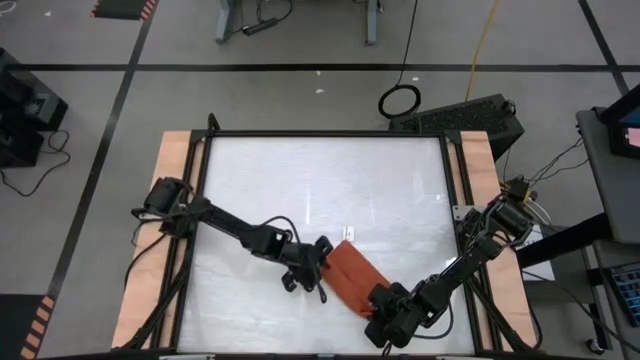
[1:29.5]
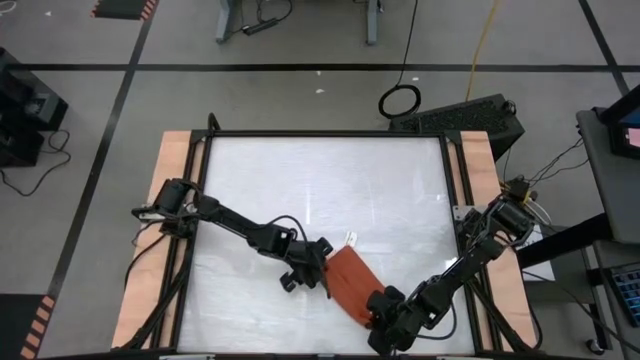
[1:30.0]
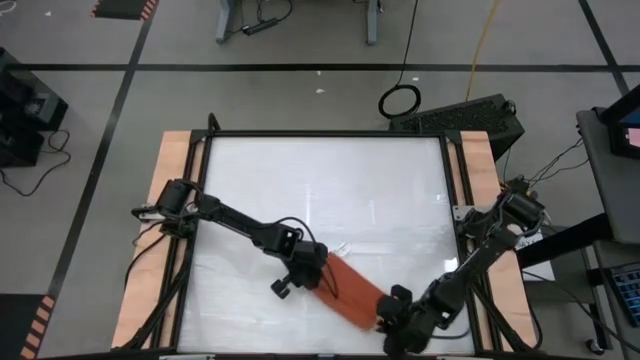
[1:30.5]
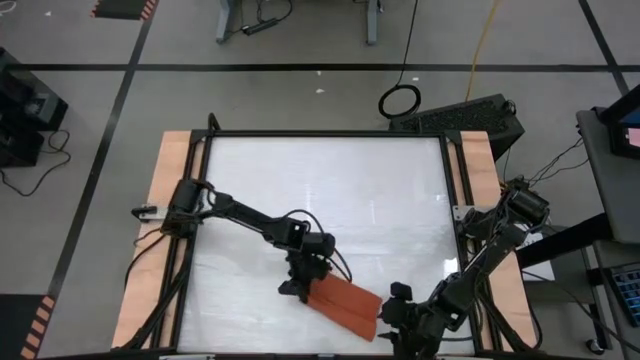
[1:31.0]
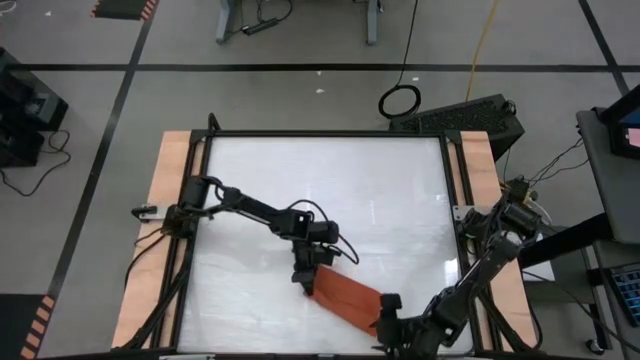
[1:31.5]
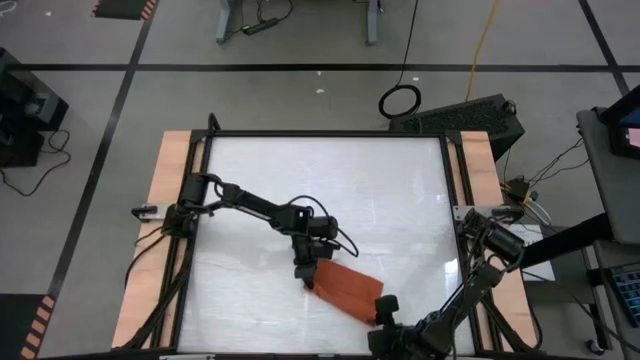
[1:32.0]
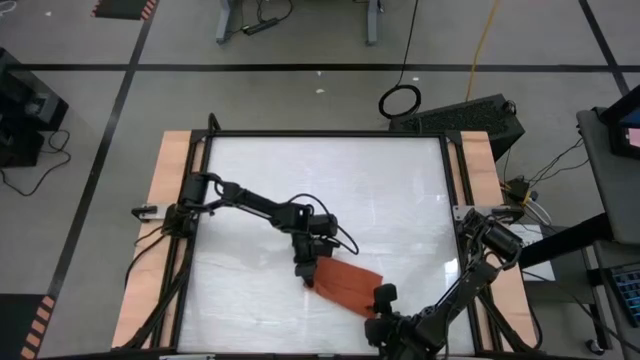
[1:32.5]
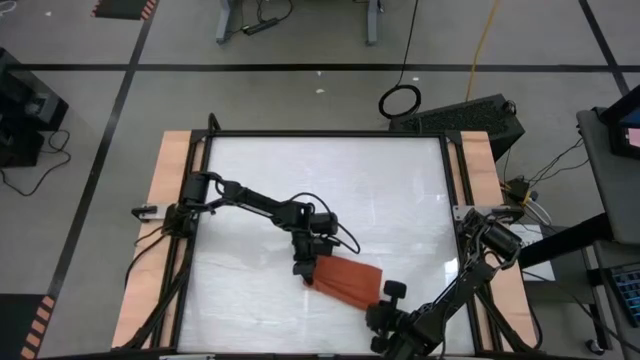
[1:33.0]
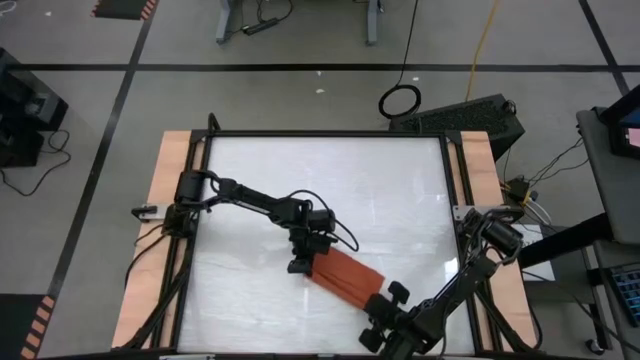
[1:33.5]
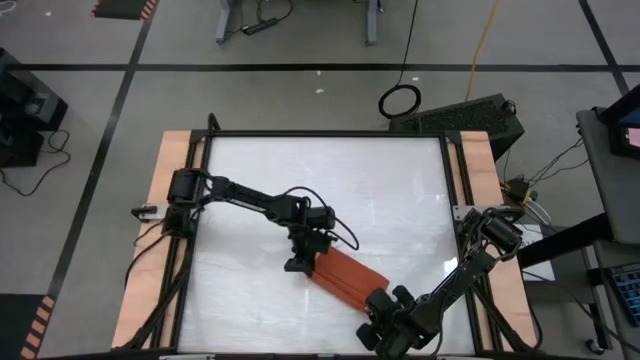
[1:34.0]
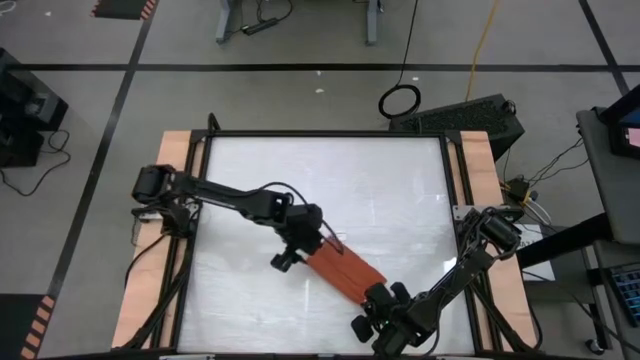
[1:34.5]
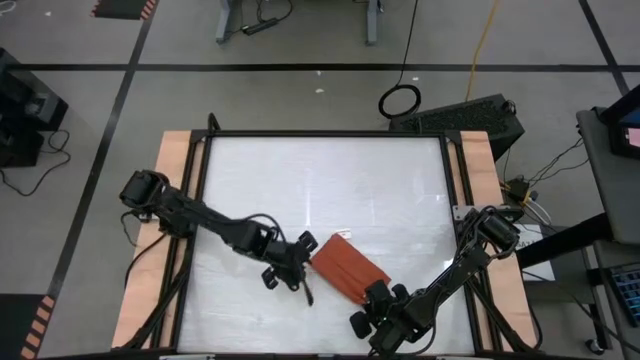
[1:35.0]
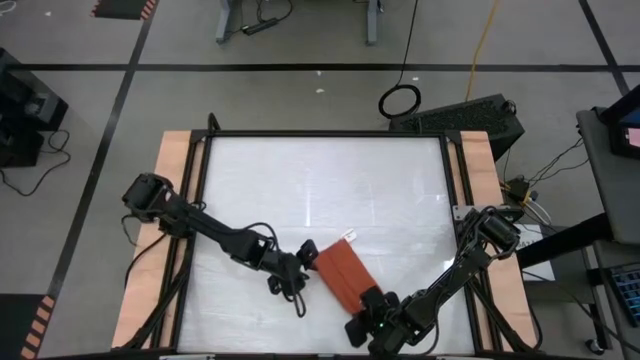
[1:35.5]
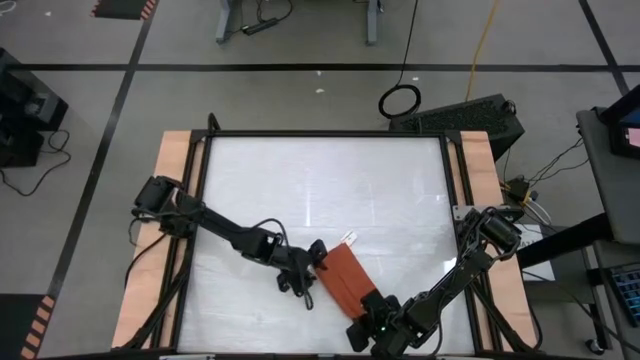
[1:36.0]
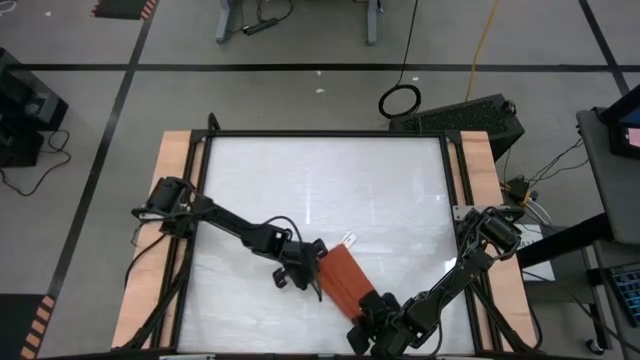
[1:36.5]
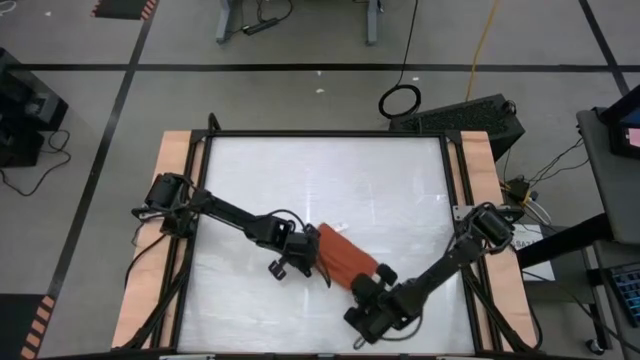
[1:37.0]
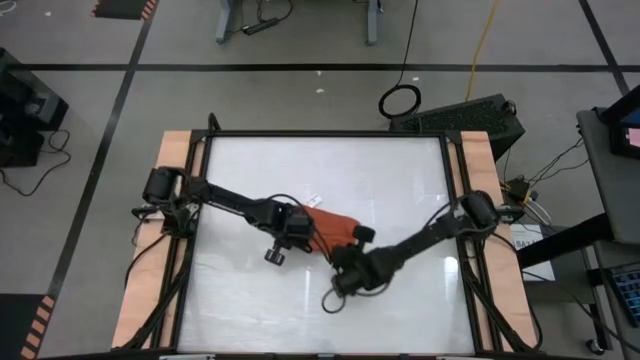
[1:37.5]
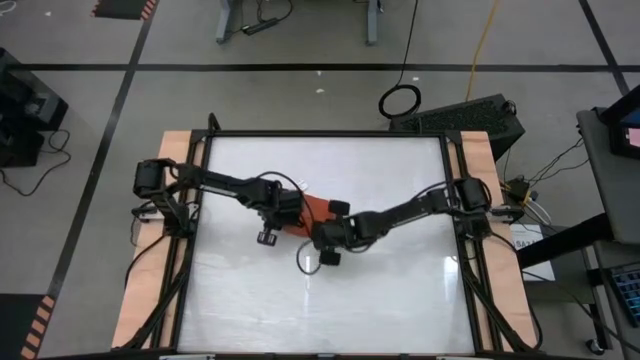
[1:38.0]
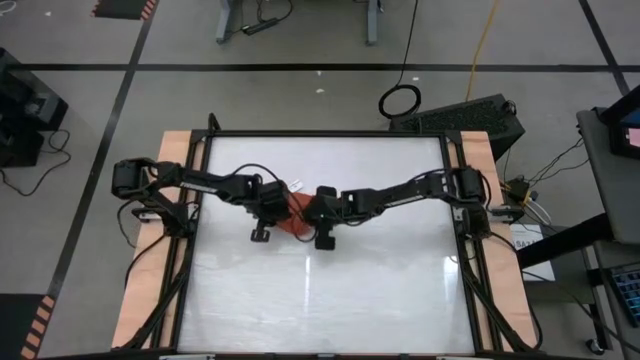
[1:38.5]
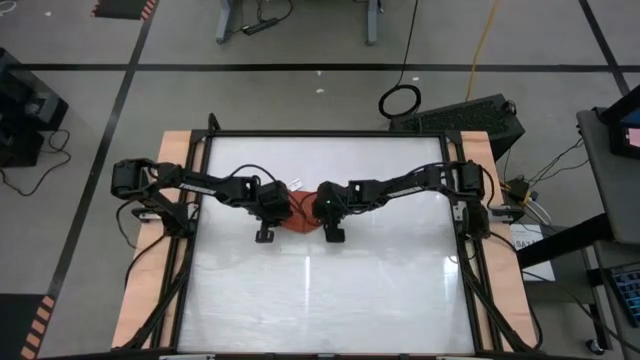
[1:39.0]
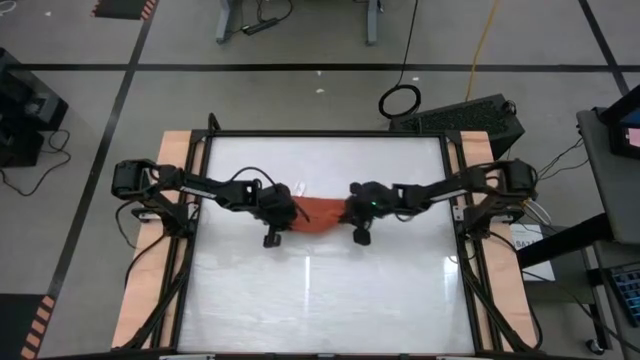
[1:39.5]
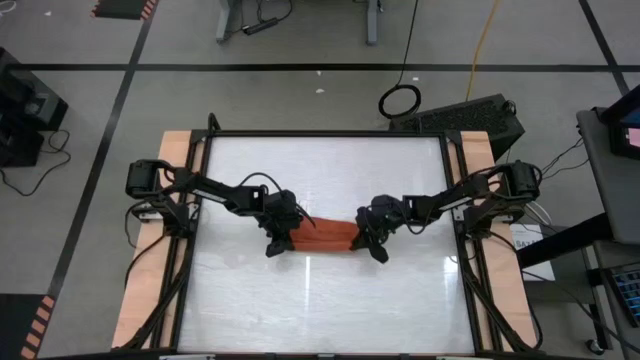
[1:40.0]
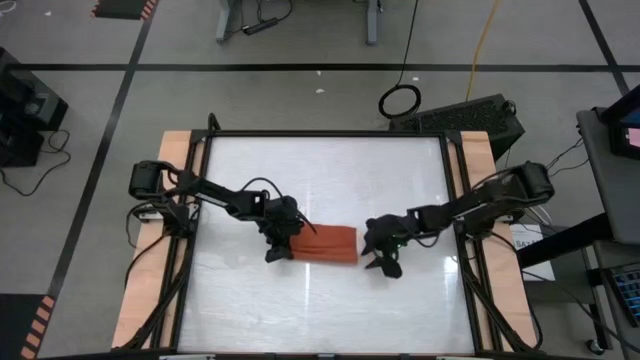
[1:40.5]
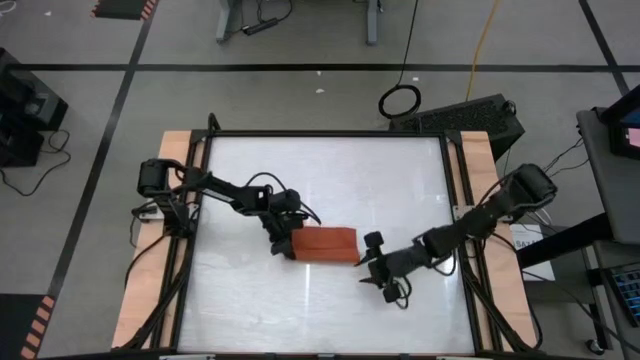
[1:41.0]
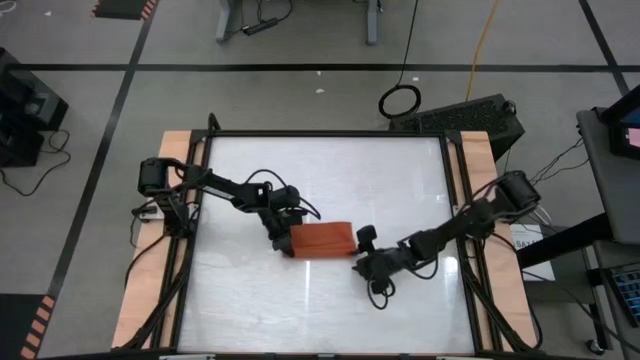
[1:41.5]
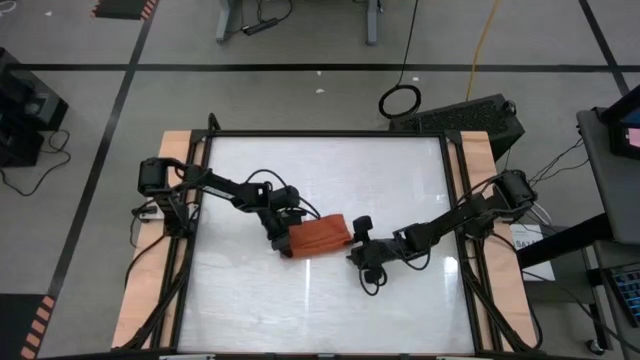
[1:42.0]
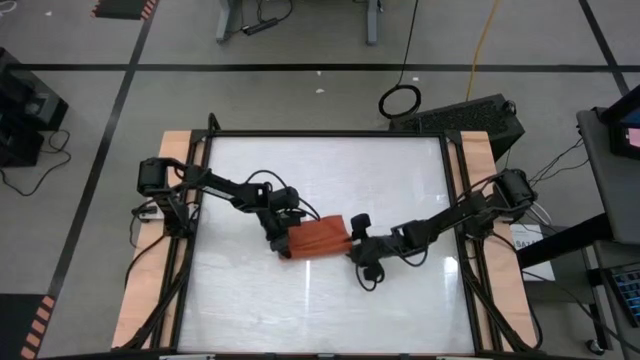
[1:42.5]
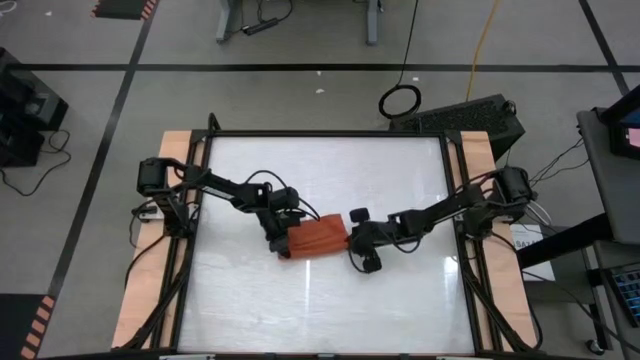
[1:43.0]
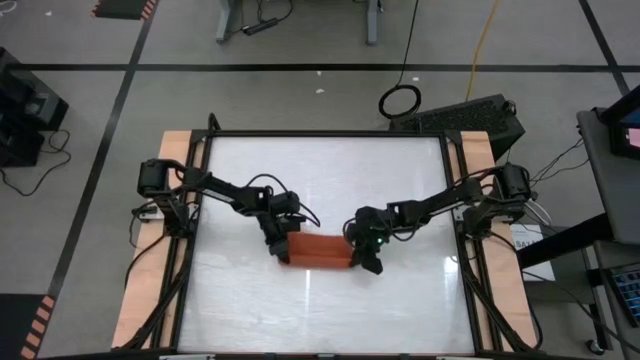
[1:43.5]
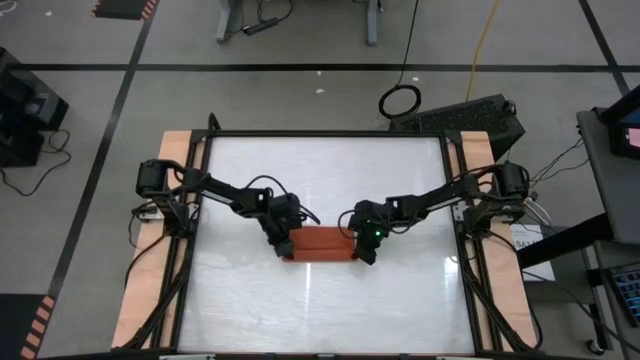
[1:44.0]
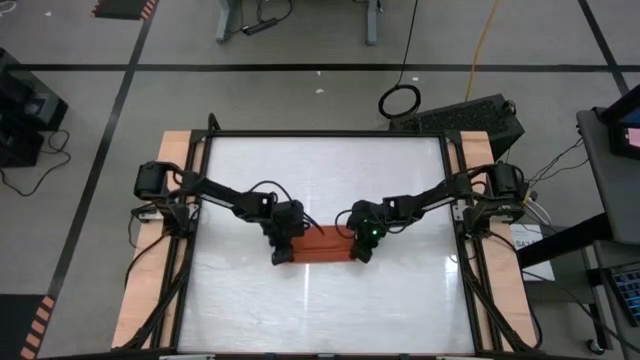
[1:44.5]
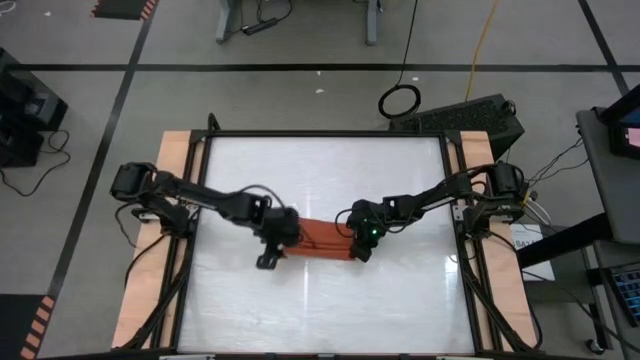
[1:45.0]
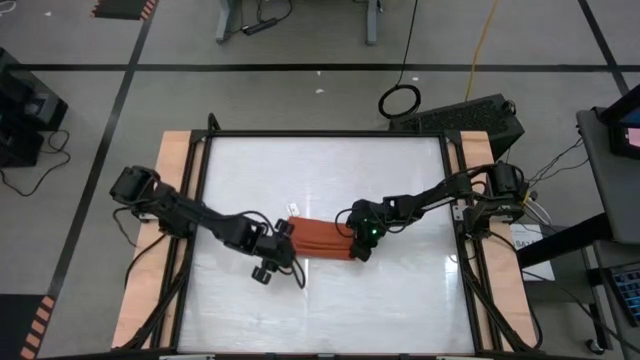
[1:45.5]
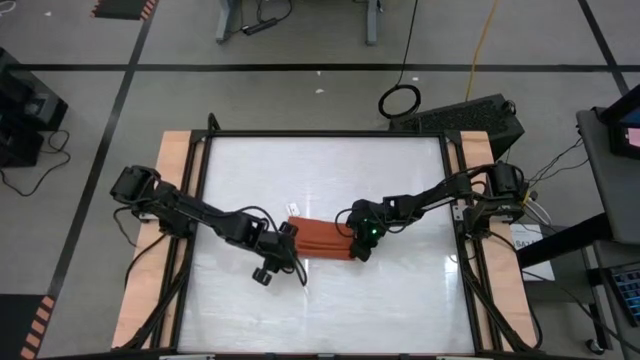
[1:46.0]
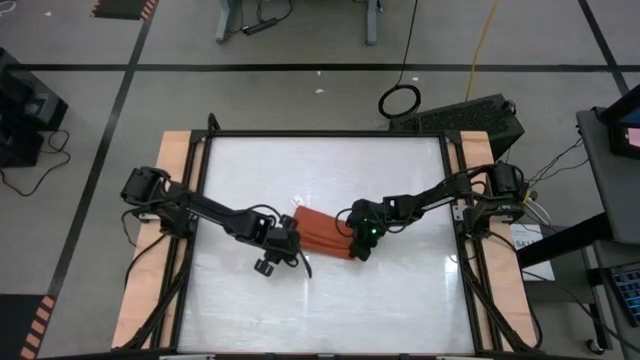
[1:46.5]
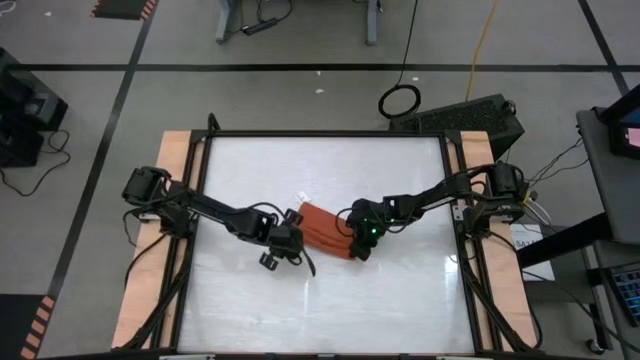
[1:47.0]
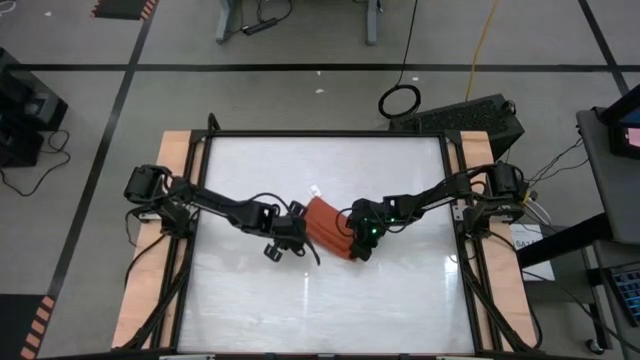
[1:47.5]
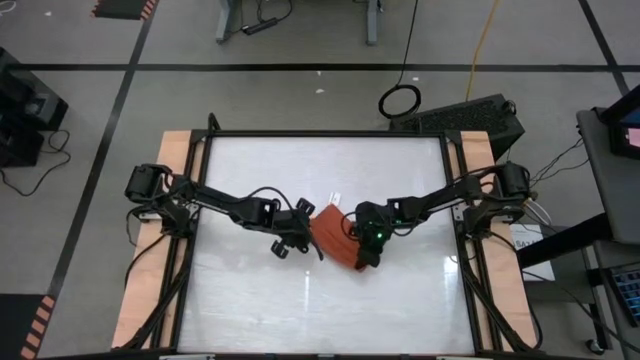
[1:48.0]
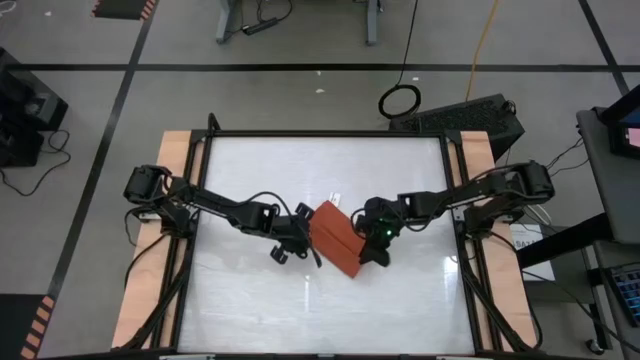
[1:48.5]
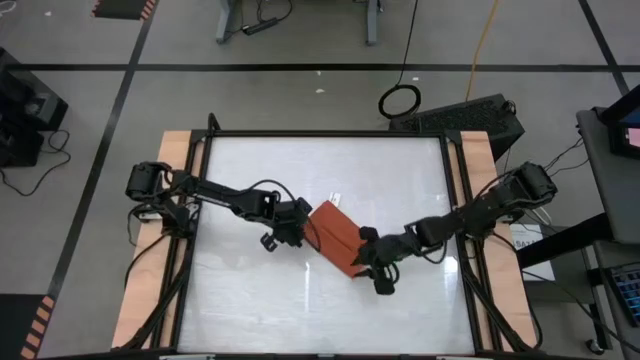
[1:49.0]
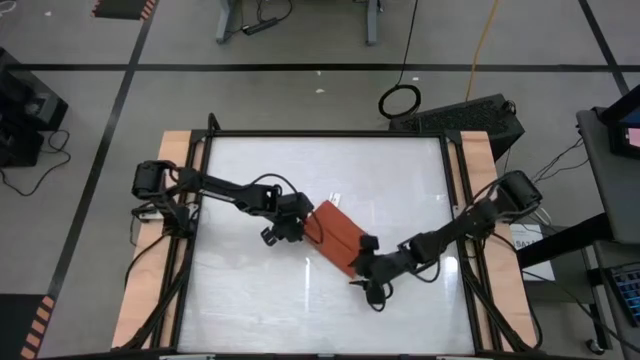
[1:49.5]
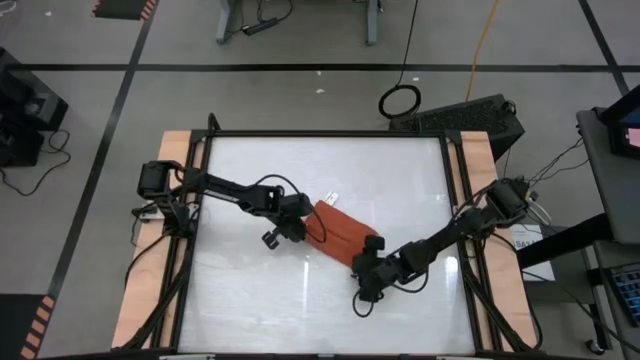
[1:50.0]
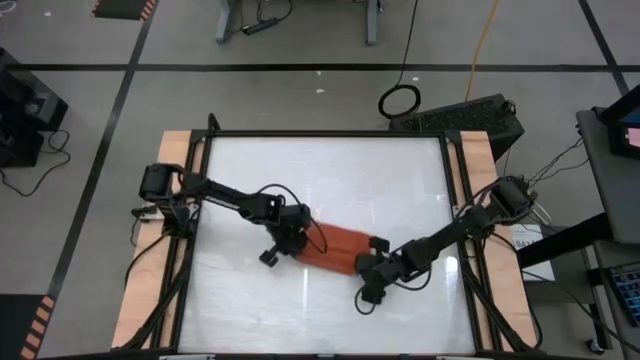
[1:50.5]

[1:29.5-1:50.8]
Task: Roll towel
Roll the orange towel
